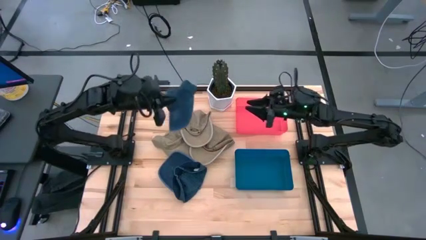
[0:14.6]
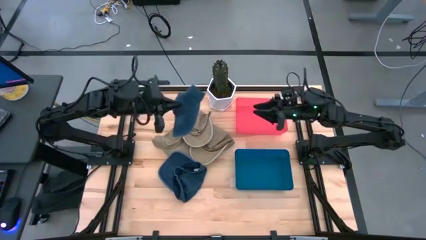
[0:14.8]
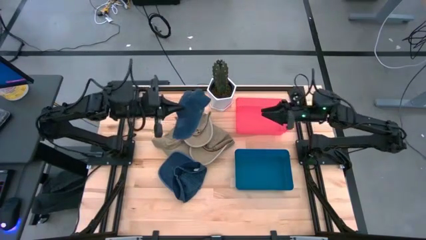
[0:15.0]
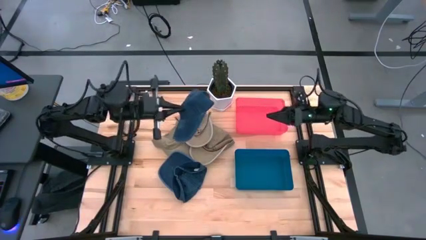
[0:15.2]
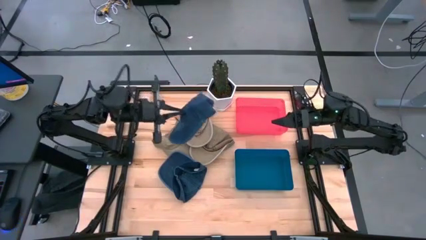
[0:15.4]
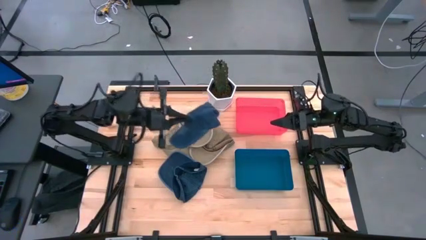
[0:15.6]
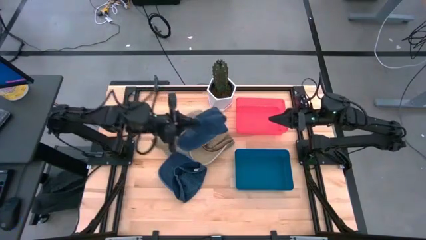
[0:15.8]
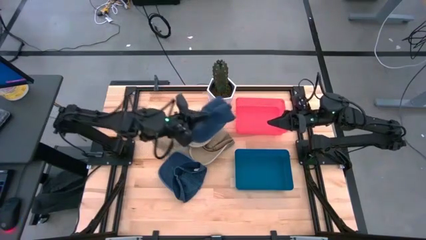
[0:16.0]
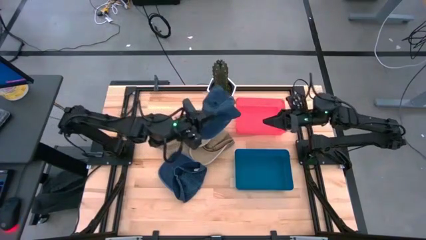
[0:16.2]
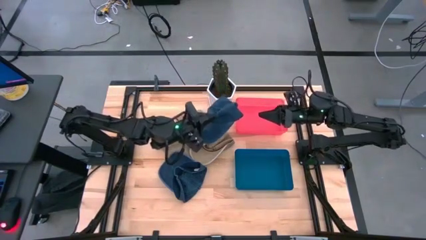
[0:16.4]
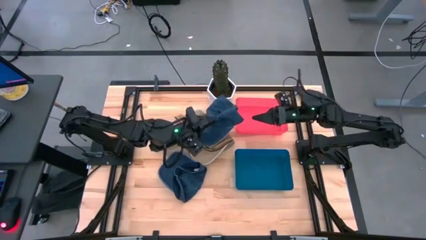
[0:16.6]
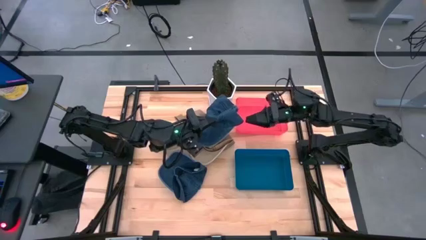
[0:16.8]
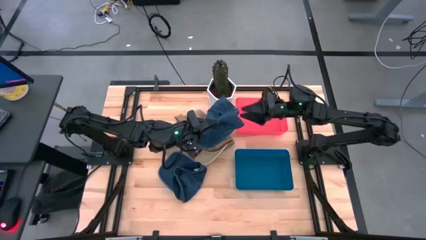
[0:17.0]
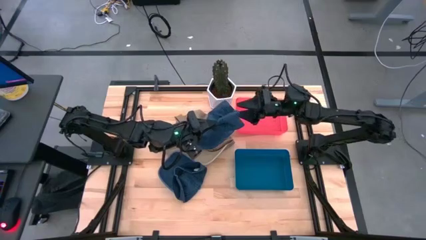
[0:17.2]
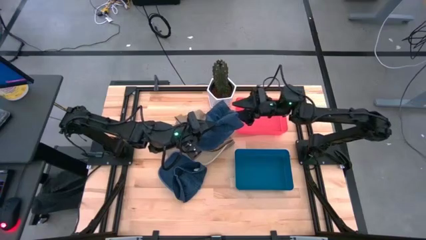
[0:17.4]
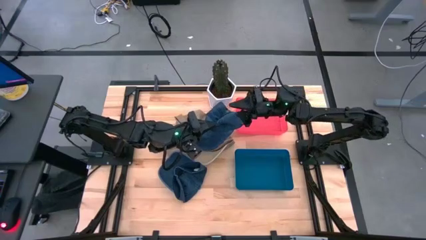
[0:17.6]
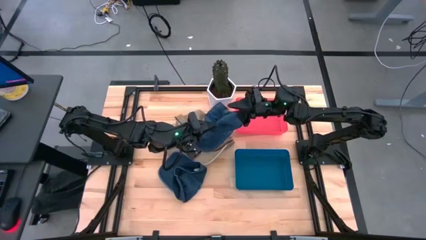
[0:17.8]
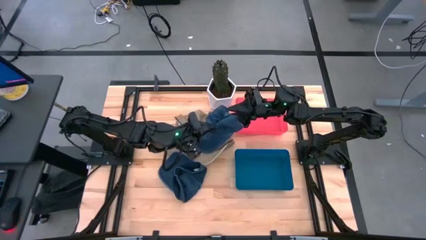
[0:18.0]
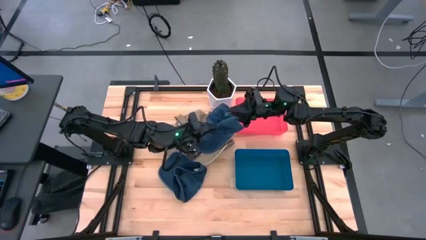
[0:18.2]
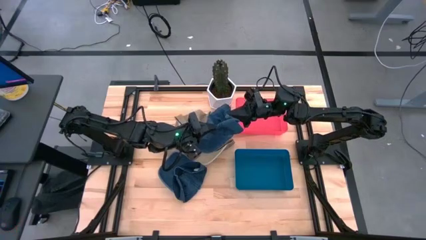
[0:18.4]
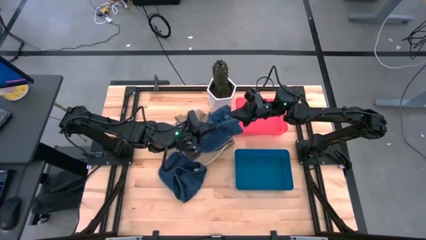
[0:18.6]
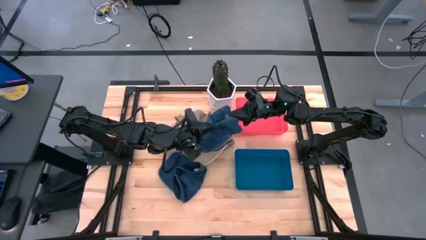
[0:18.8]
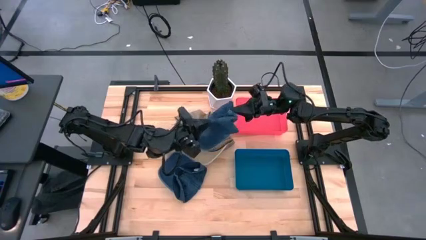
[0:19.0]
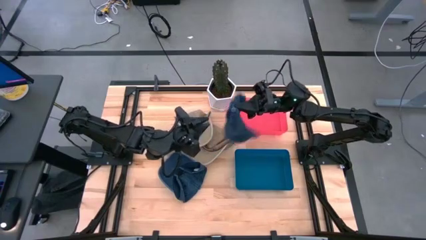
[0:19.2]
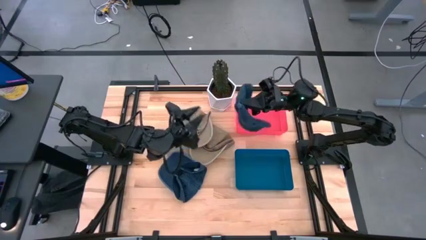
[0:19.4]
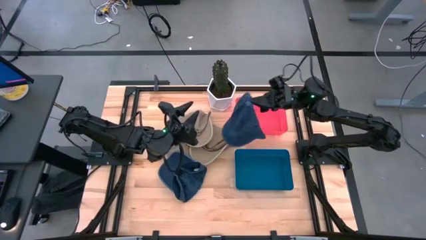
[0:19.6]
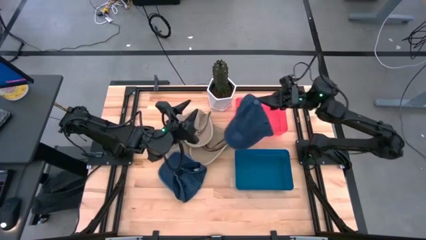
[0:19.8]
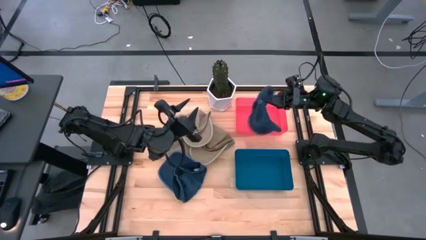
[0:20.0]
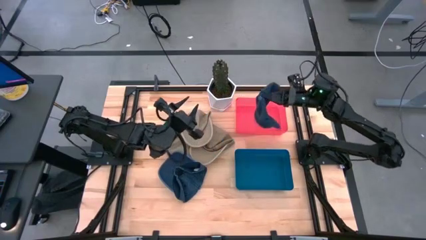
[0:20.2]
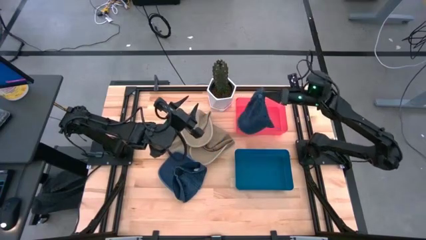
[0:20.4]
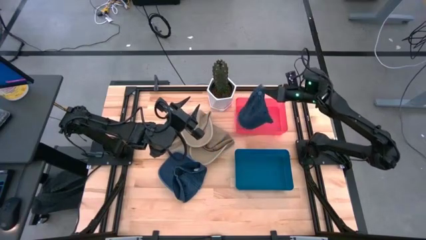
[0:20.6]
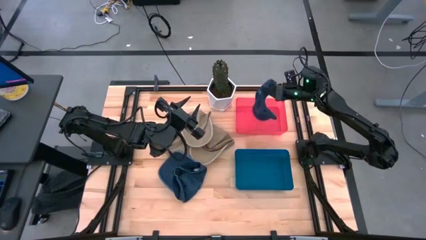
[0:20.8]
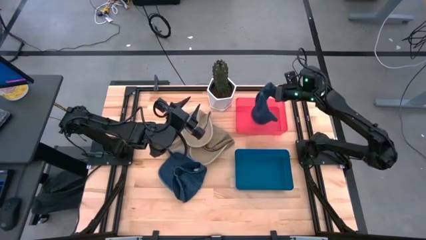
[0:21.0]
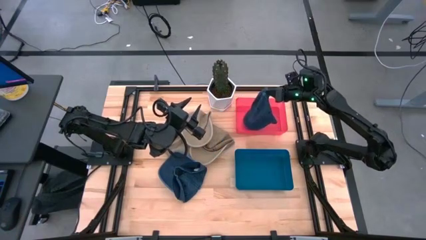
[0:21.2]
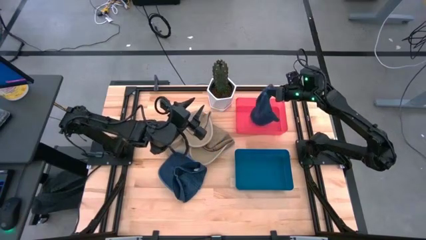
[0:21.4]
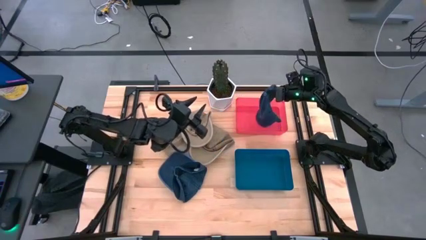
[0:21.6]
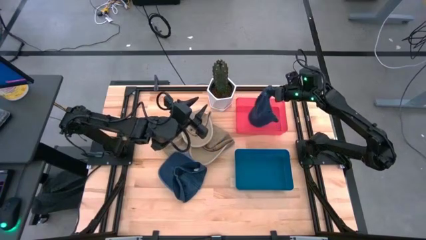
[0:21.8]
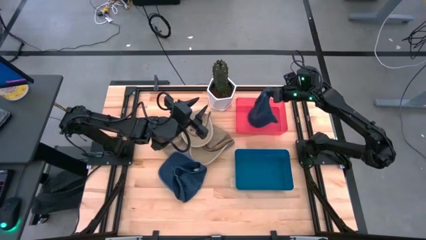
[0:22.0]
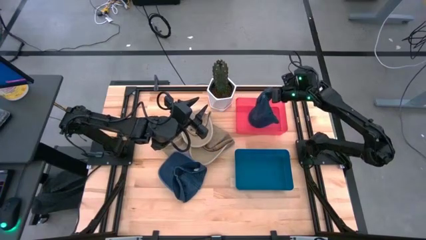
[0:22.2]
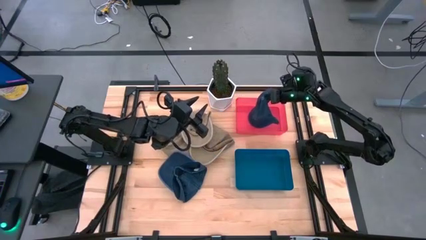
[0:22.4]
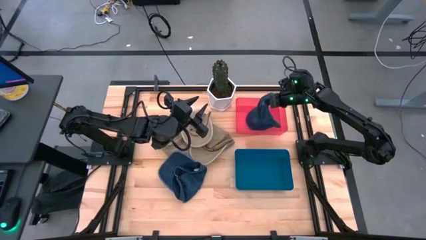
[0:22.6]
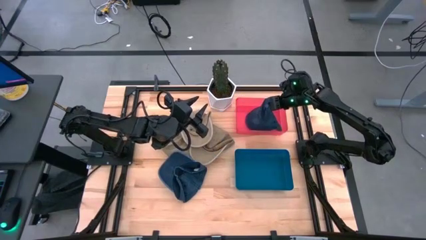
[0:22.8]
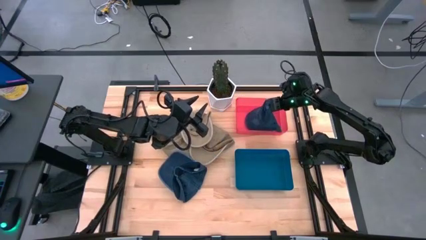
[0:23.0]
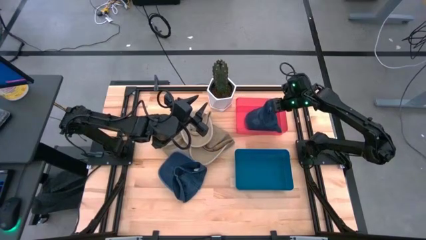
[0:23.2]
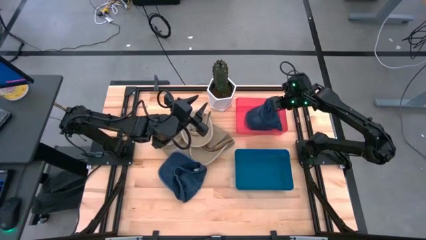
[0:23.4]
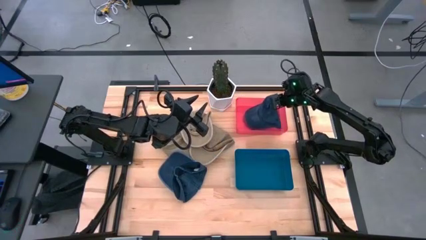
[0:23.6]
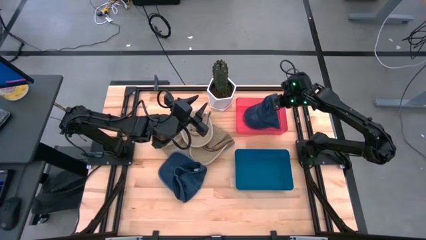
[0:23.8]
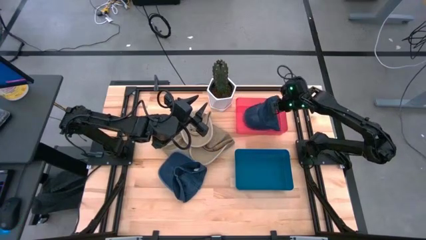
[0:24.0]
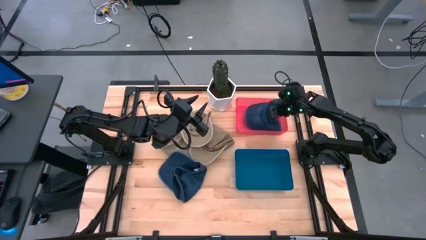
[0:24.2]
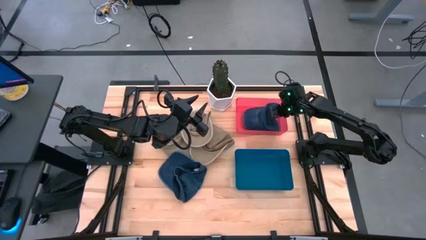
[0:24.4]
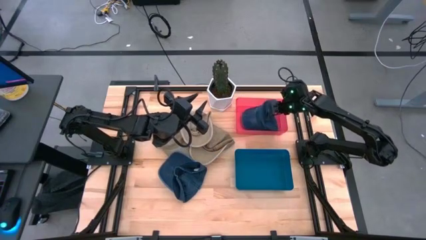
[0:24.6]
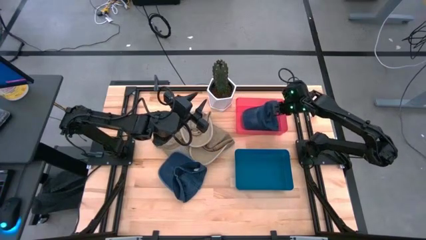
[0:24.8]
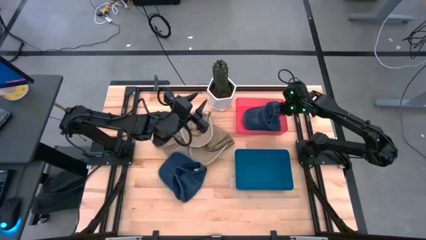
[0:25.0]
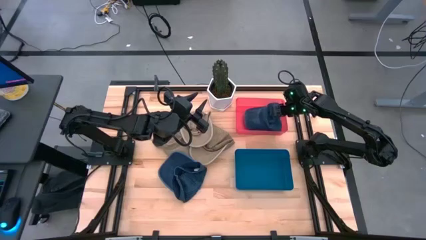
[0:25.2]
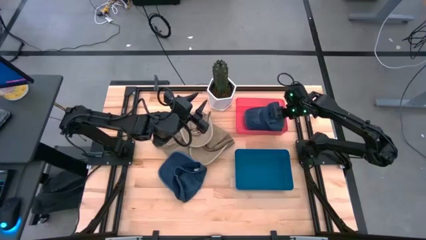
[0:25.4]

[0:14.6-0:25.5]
Task: Pick & Place hat
Put the top blue cap into the pink bin
